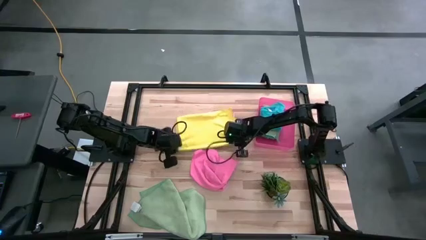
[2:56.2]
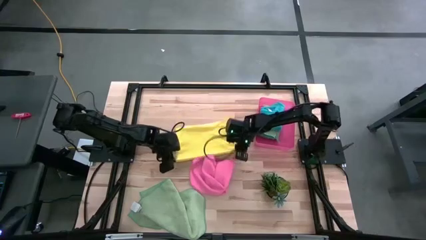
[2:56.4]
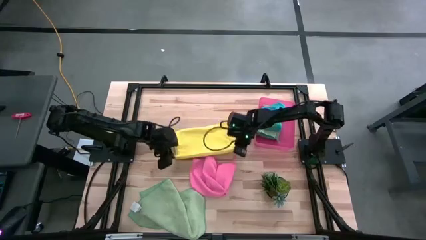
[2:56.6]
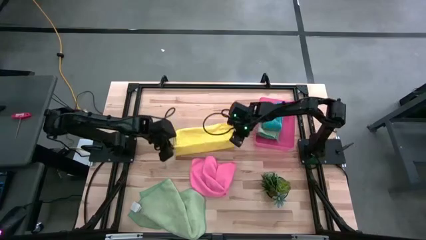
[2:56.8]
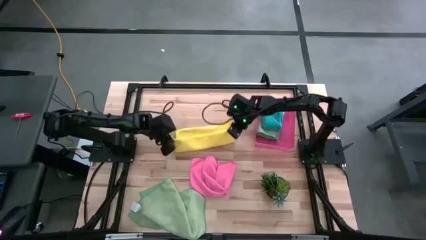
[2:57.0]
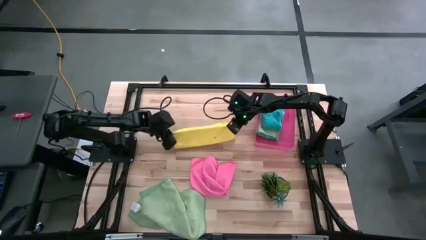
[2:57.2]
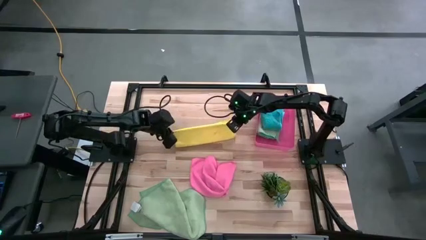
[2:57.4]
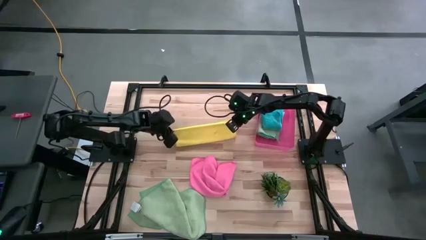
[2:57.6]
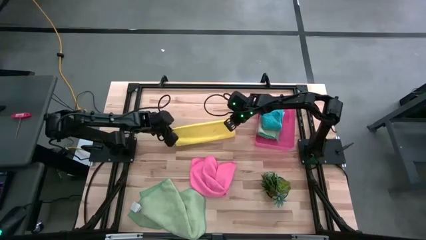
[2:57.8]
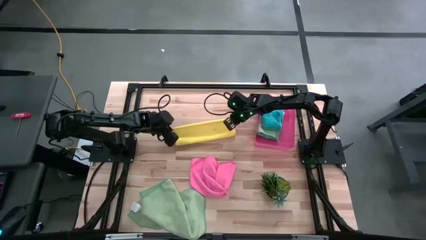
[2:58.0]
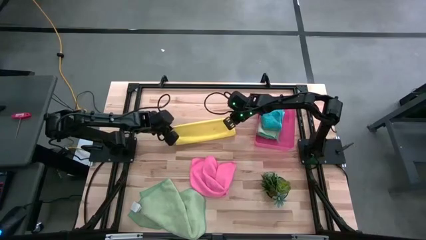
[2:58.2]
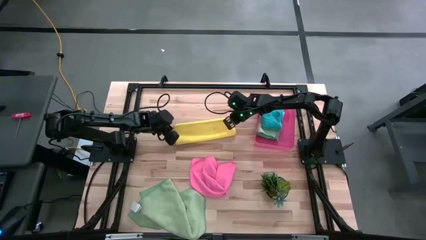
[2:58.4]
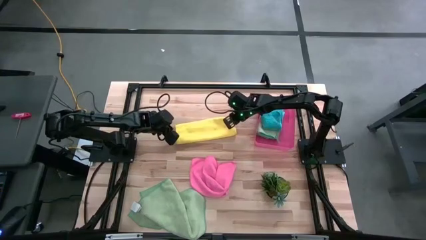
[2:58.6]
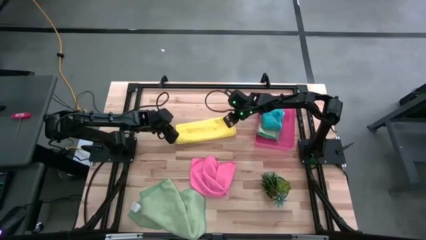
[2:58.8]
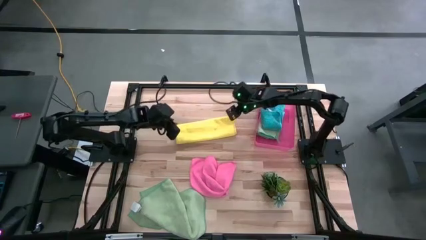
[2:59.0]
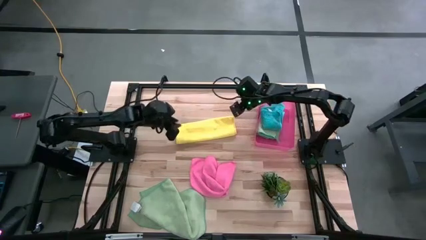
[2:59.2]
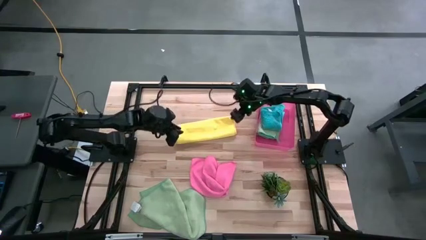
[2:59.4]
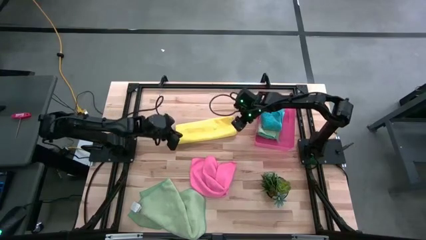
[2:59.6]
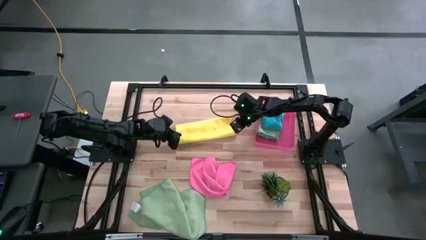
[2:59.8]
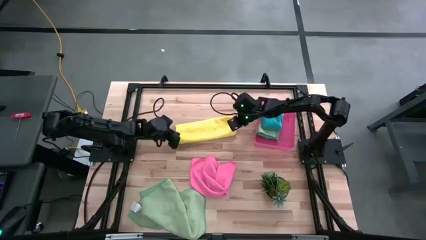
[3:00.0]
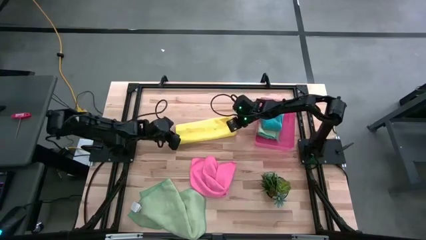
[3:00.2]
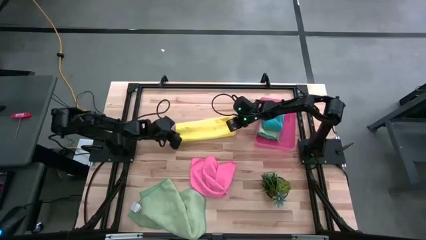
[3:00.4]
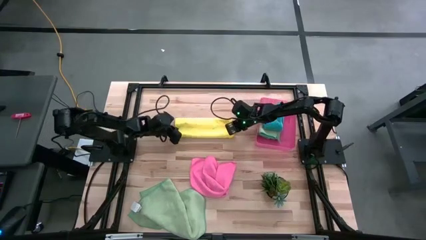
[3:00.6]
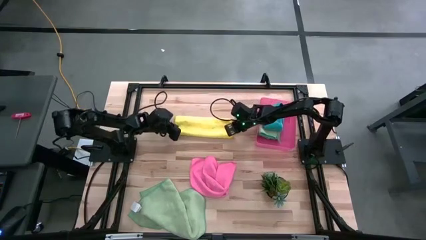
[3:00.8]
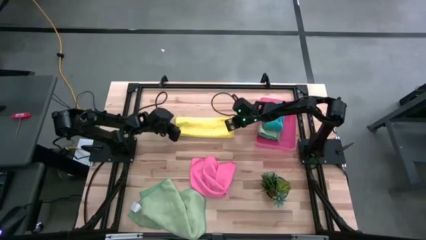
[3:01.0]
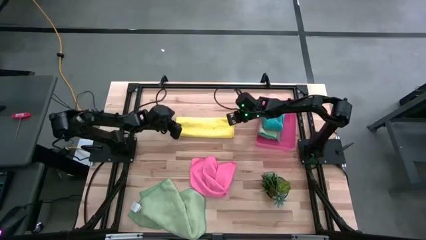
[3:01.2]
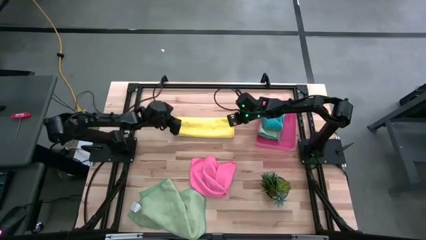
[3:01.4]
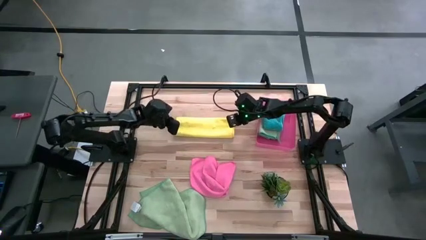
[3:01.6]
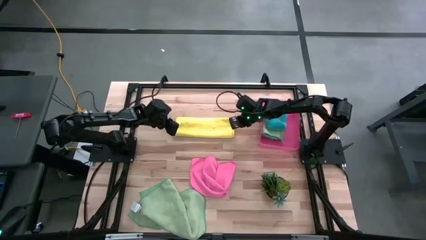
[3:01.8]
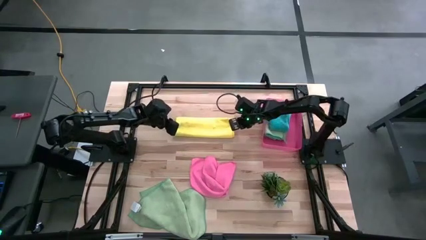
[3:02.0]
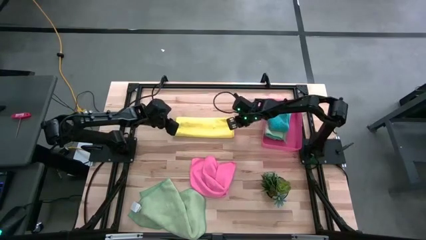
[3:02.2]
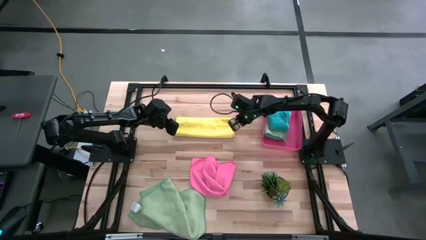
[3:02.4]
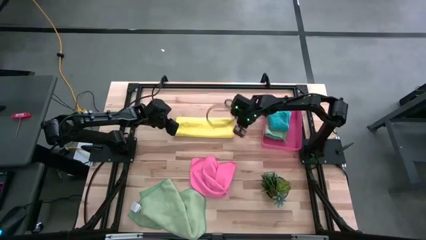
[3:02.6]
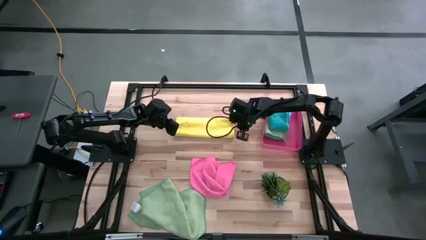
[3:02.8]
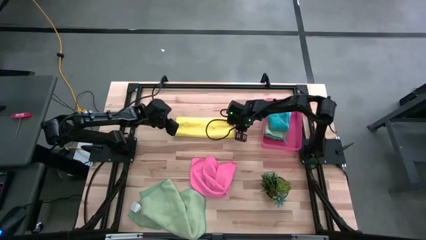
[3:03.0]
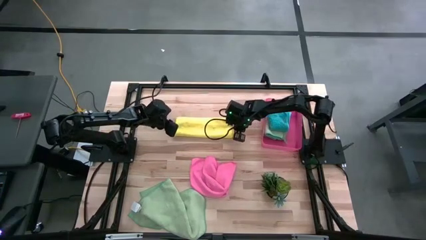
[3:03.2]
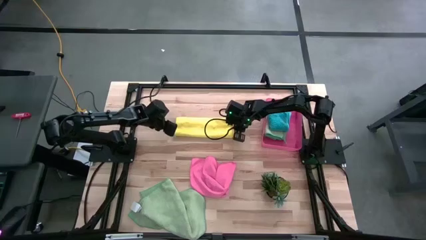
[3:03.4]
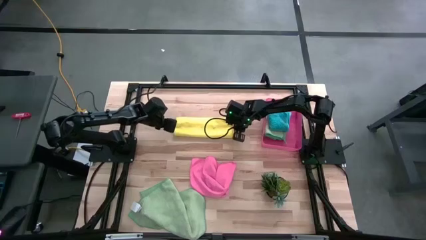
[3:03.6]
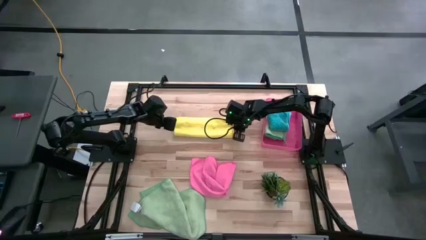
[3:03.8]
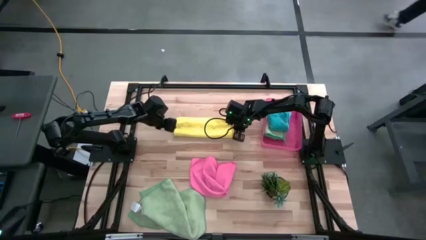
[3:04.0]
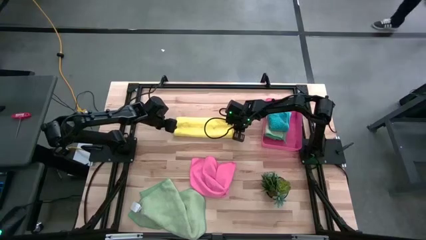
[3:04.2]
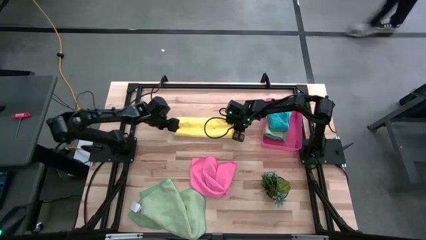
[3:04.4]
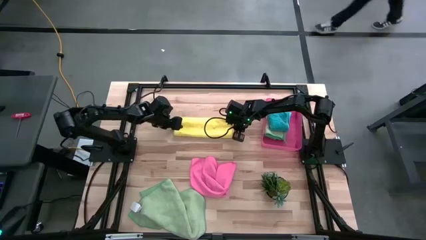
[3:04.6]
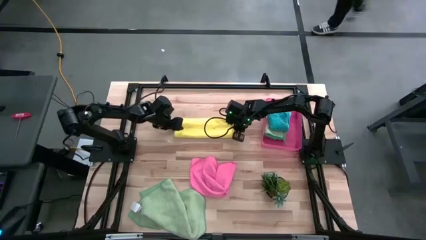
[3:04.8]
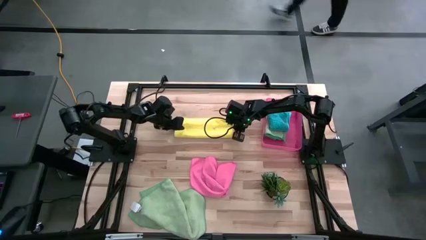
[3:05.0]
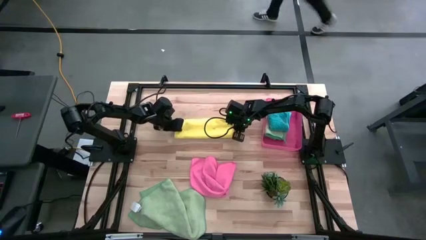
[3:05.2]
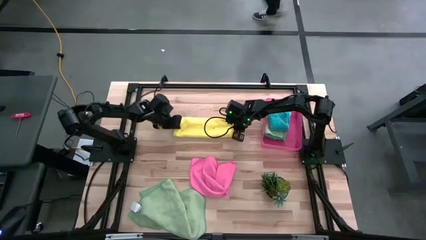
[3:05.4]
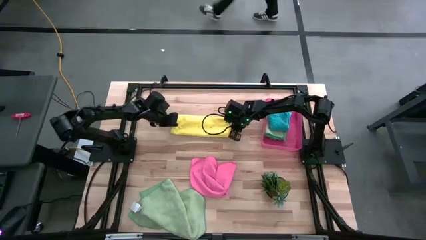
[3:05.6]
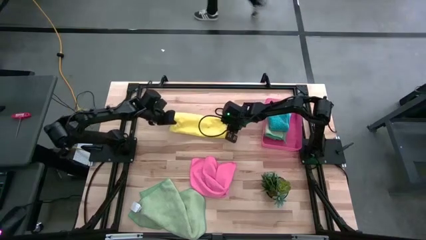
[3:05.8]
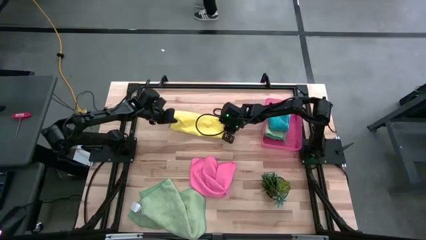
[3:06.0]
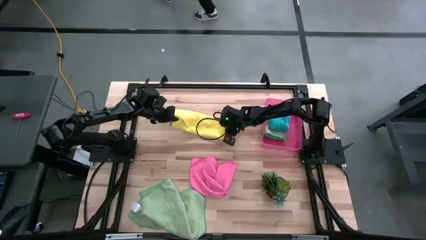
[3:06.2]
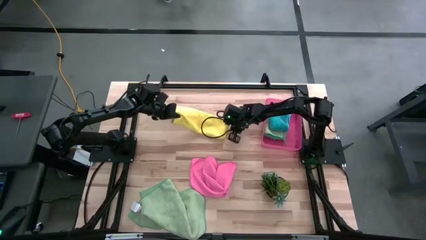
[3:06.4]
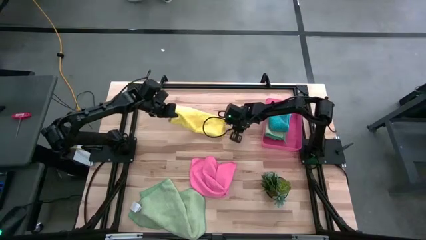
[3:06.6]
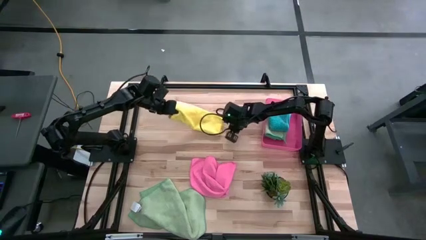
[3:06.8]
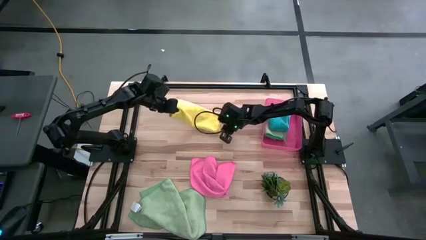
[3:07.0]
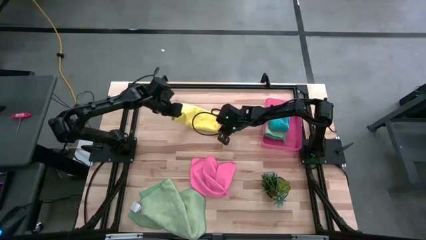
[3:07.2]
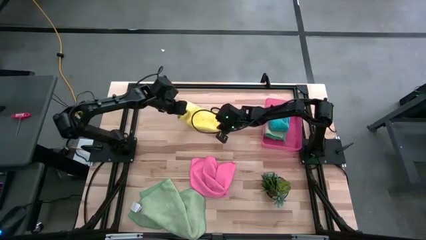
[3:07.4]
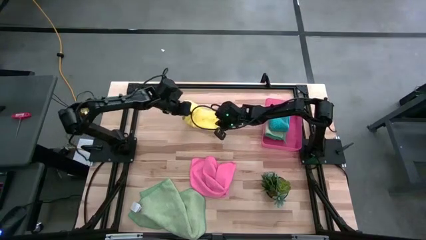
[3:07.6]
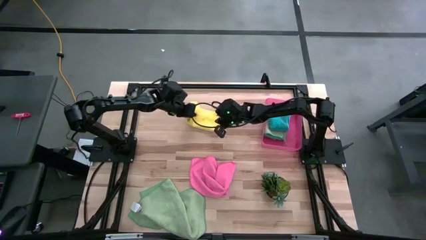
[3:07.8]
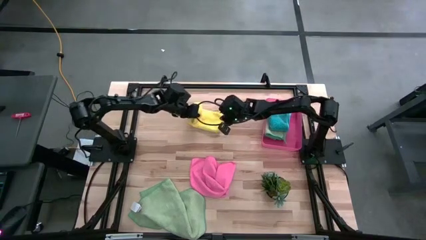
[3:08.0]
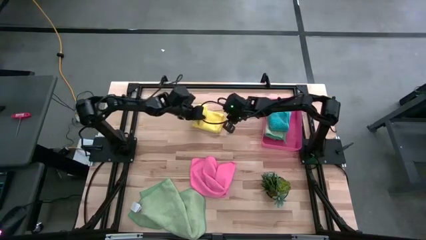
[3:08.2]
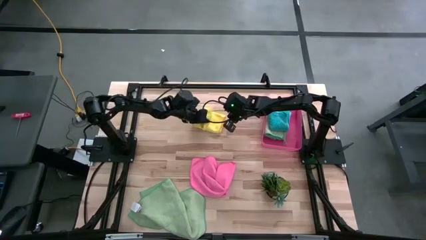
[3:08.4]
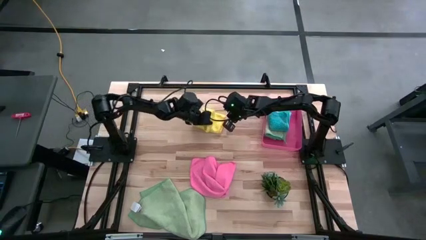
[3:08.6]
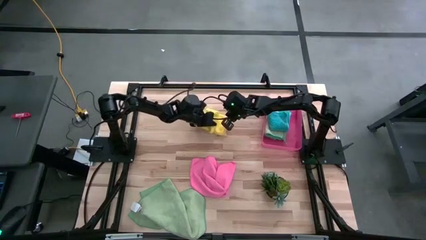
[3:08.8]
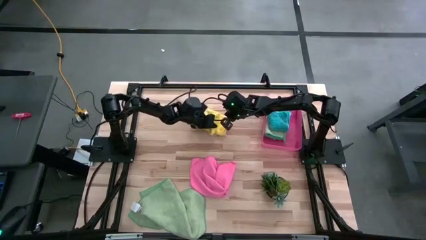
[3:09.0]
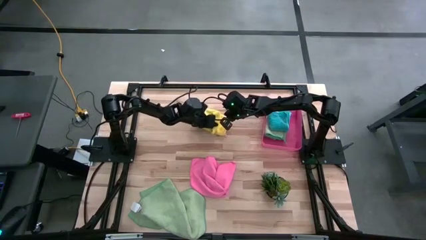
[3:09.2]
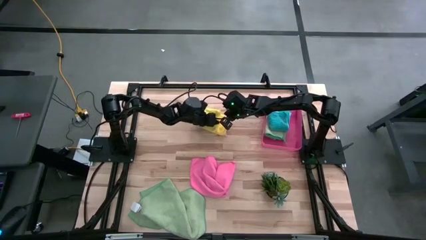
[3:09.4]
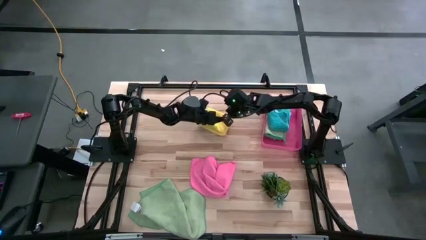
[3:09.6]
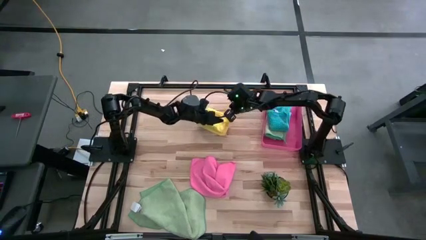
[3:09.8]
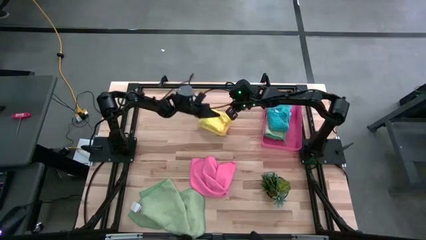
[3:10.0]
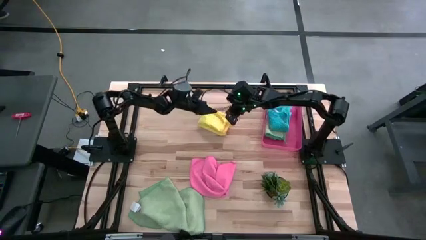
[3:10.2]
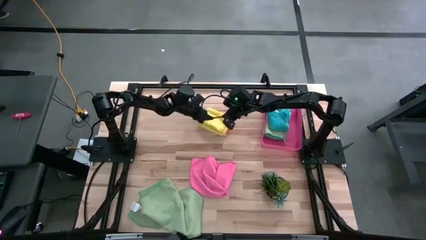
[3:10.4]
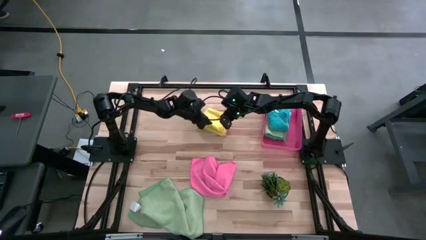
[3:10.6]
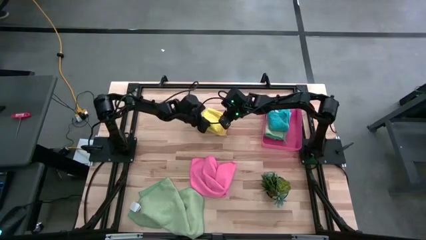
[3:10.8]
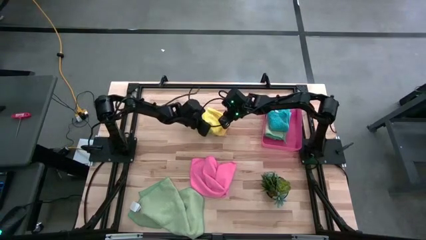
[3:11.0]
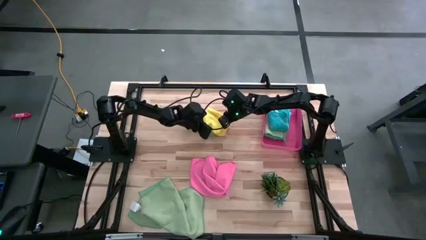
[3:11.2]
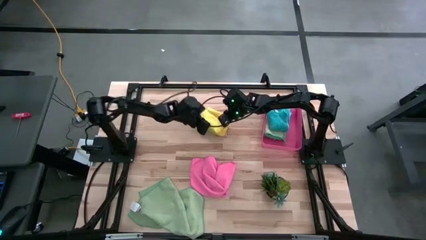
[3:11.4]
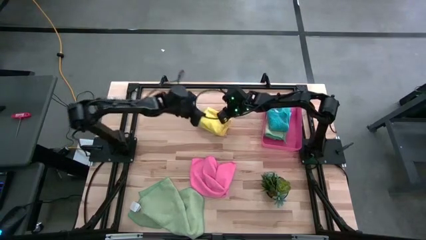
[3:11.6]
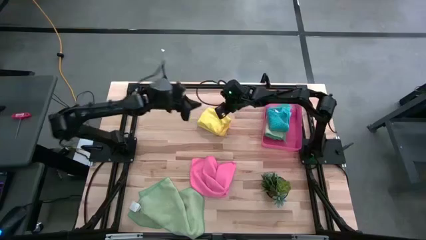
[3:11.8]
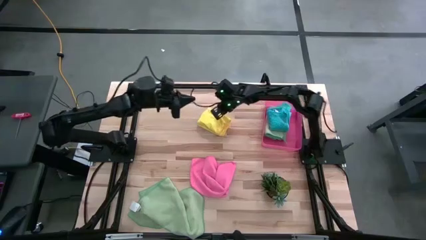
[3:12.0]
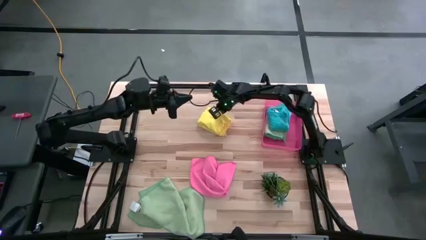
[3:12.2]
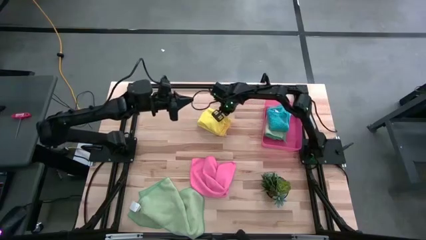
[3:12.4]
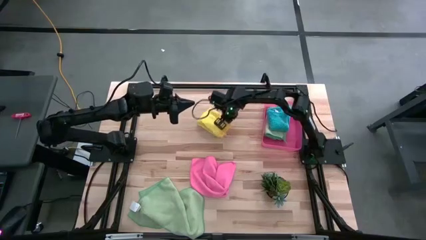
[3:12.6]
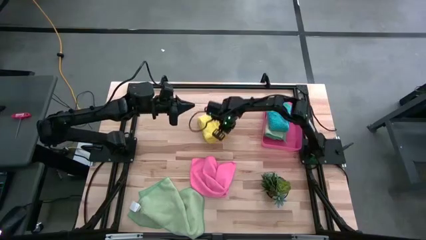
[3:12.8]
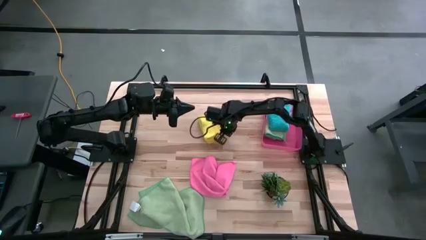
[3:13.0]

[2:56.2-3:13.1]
Task: Fold microfiber towels
Fold the yellow microfiber cloth
